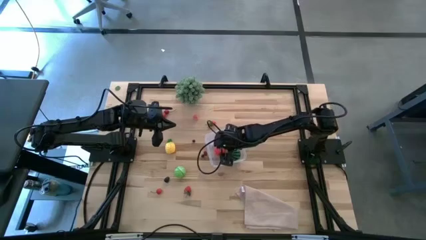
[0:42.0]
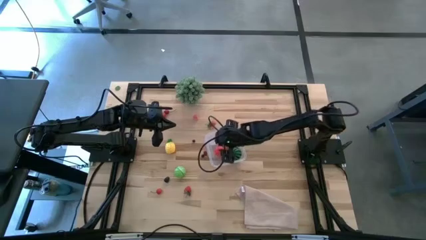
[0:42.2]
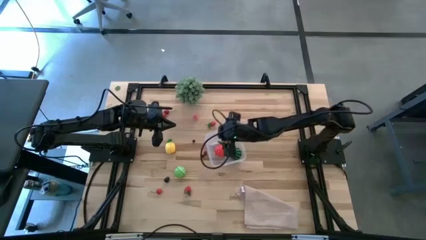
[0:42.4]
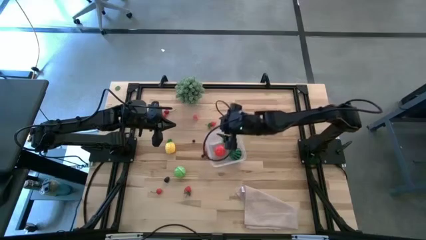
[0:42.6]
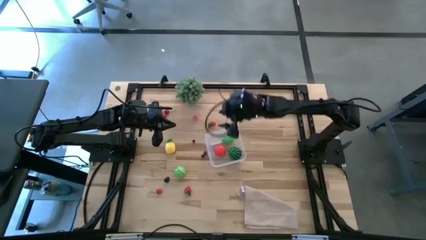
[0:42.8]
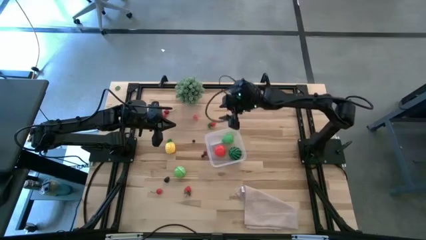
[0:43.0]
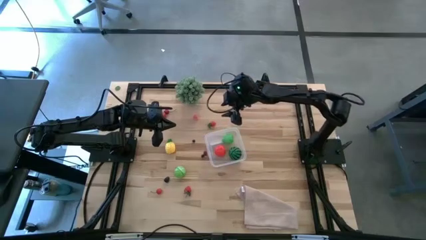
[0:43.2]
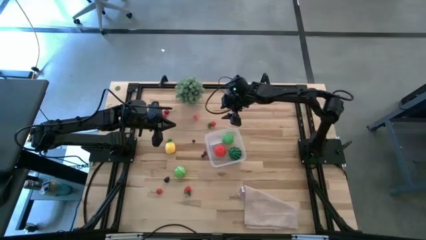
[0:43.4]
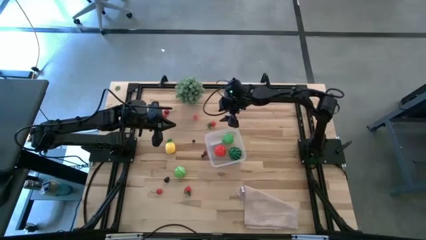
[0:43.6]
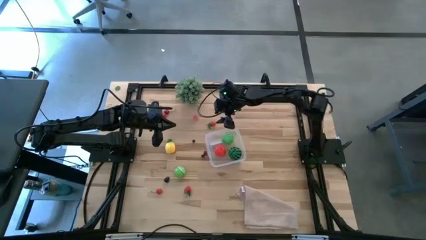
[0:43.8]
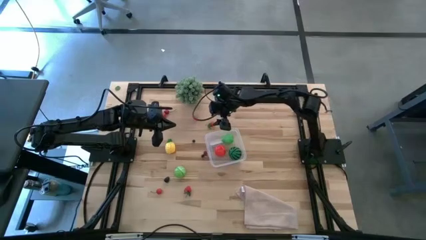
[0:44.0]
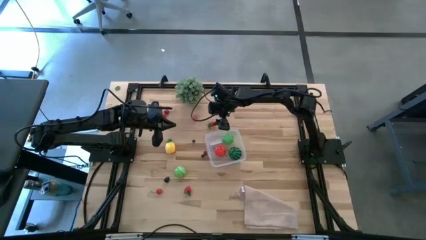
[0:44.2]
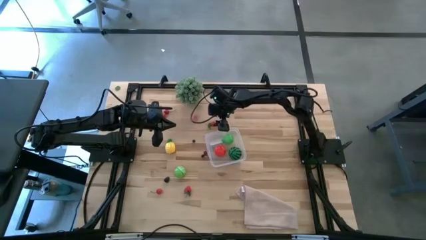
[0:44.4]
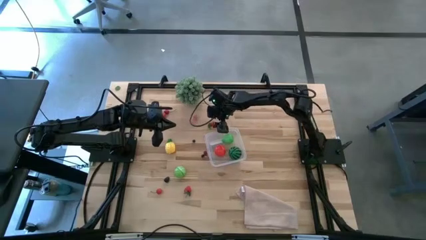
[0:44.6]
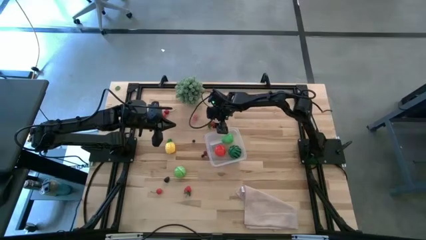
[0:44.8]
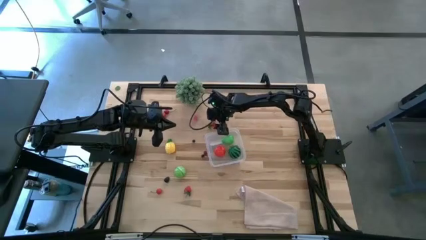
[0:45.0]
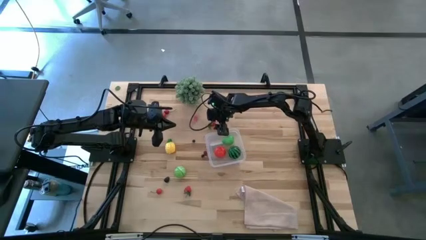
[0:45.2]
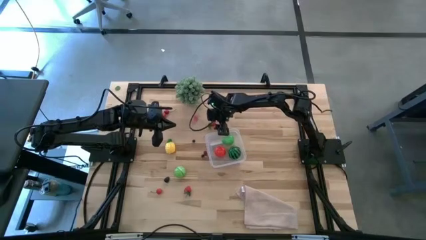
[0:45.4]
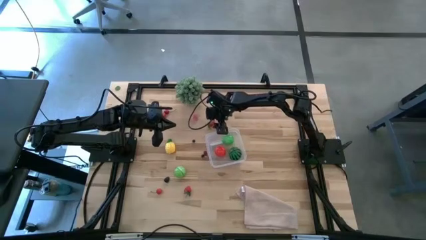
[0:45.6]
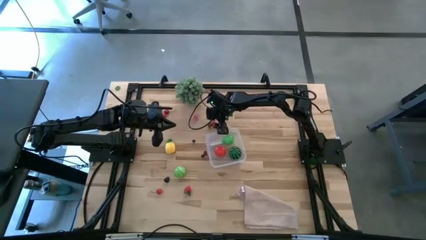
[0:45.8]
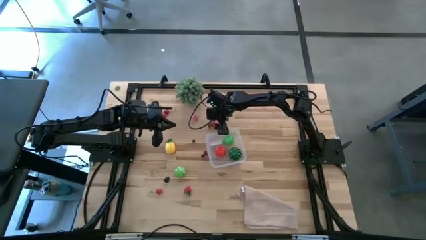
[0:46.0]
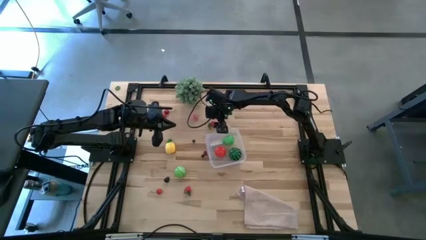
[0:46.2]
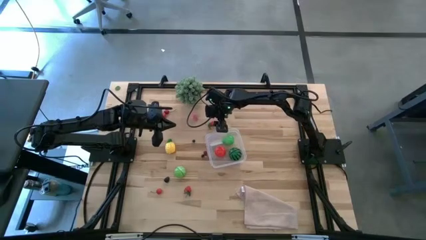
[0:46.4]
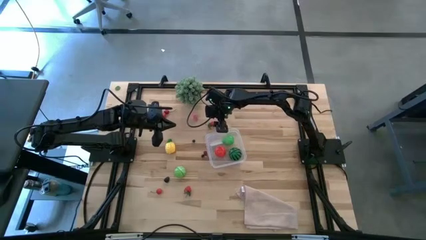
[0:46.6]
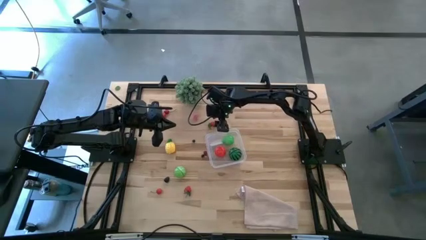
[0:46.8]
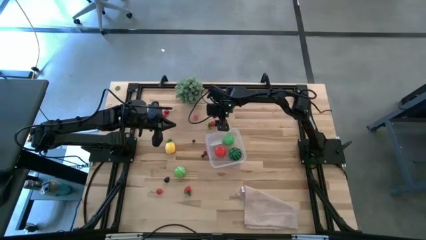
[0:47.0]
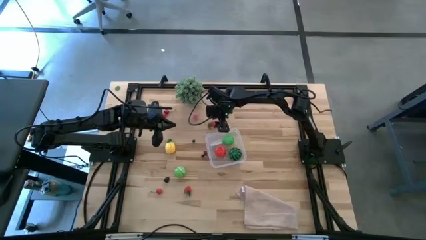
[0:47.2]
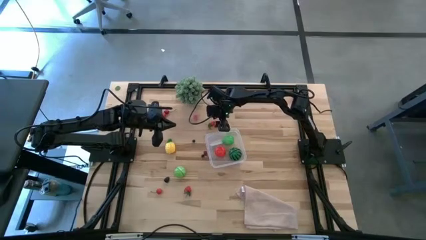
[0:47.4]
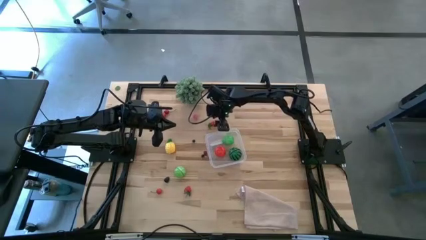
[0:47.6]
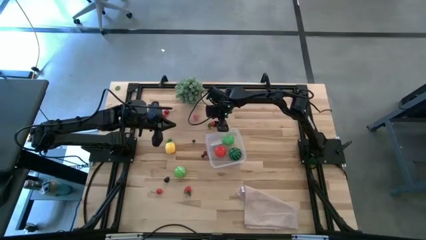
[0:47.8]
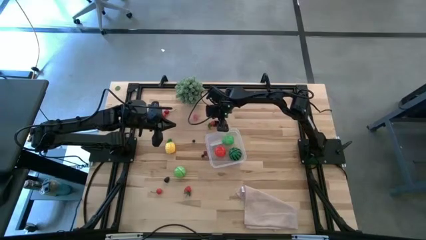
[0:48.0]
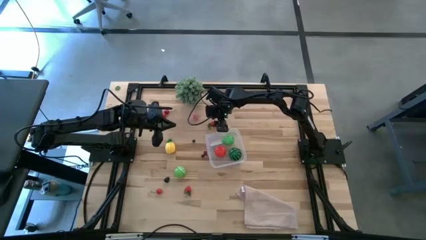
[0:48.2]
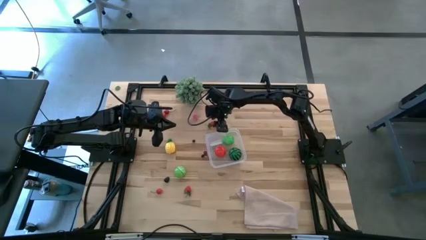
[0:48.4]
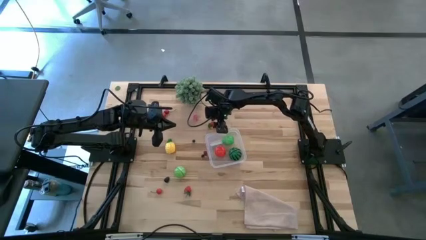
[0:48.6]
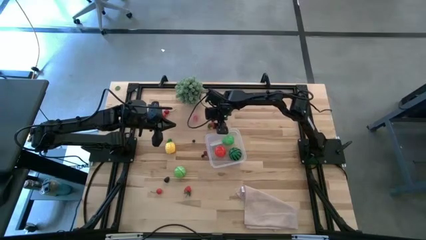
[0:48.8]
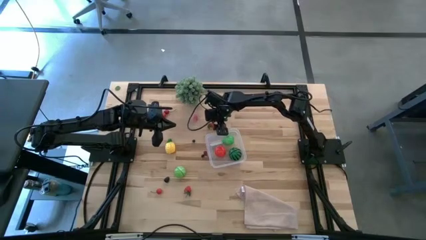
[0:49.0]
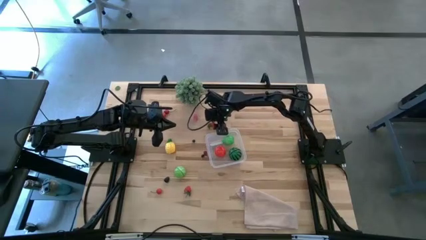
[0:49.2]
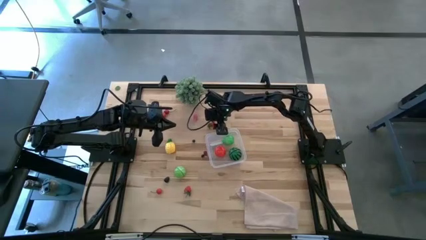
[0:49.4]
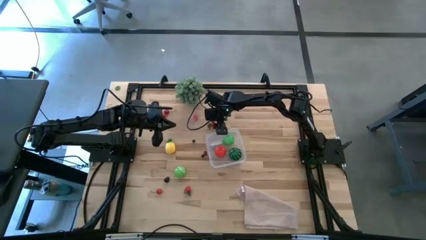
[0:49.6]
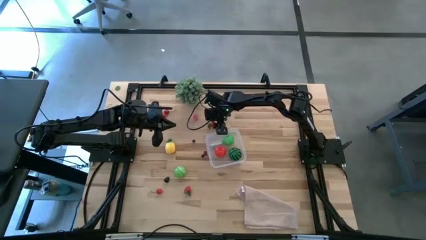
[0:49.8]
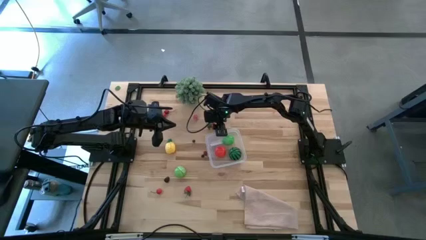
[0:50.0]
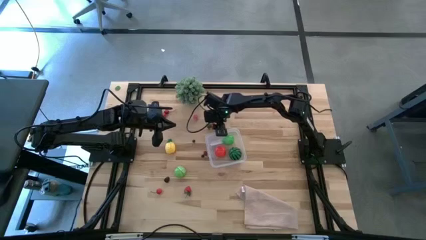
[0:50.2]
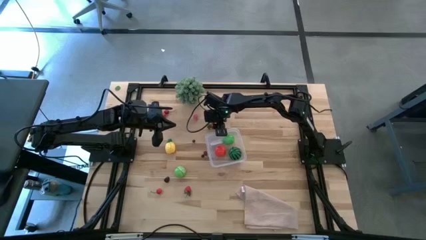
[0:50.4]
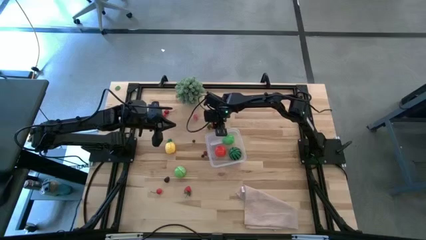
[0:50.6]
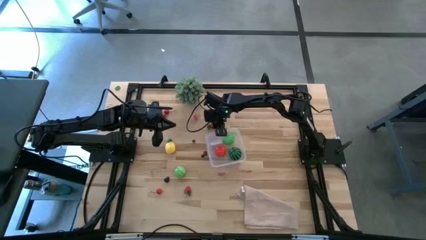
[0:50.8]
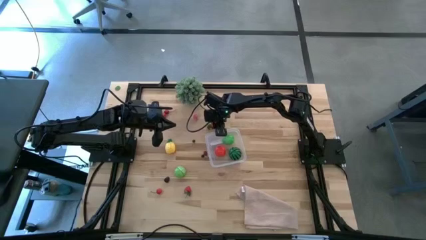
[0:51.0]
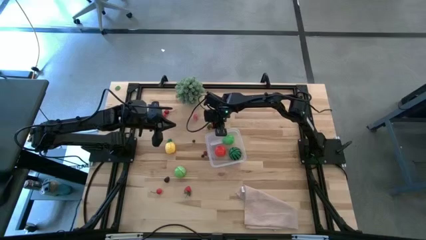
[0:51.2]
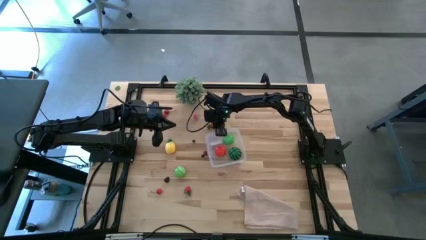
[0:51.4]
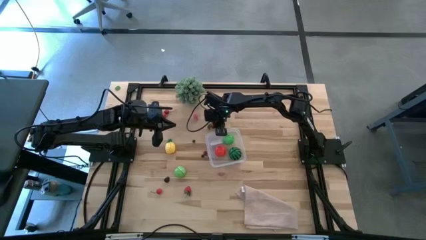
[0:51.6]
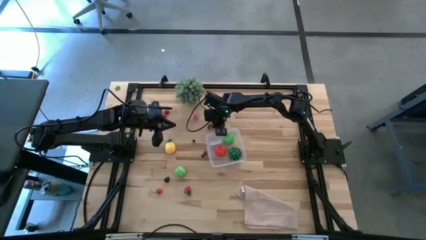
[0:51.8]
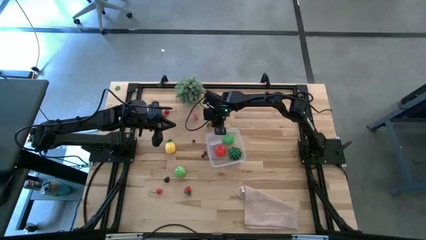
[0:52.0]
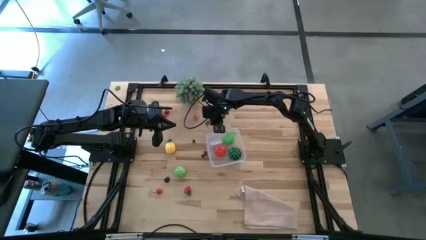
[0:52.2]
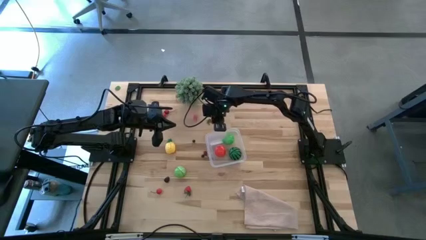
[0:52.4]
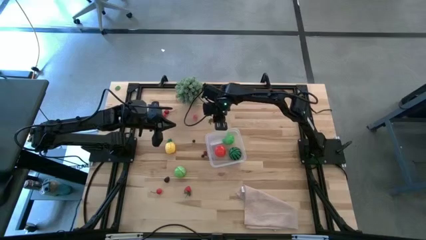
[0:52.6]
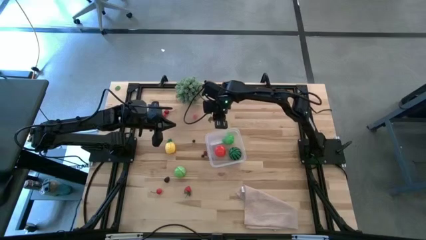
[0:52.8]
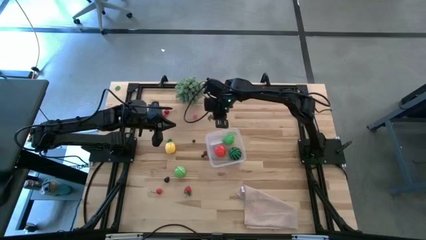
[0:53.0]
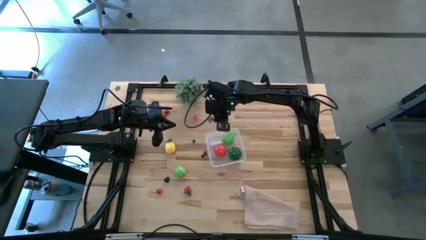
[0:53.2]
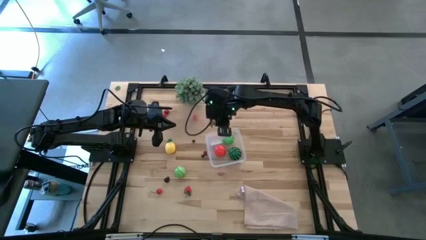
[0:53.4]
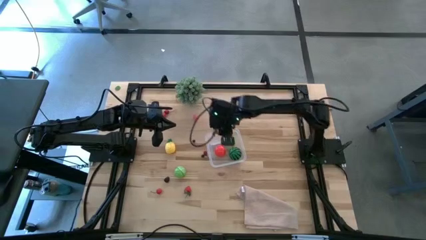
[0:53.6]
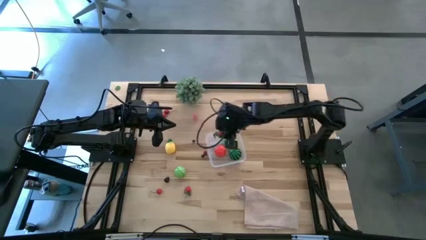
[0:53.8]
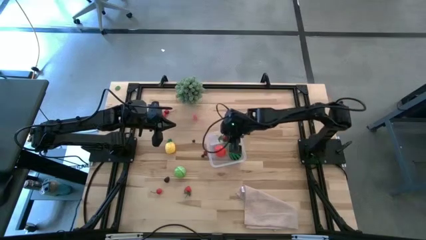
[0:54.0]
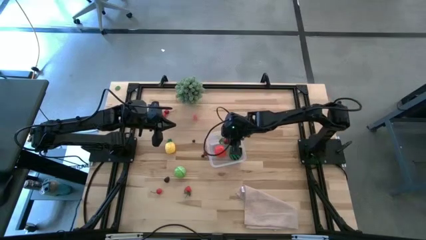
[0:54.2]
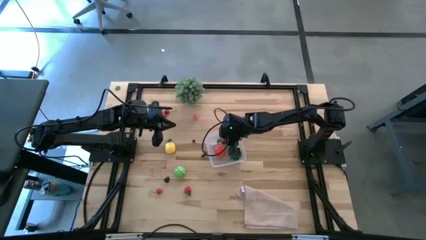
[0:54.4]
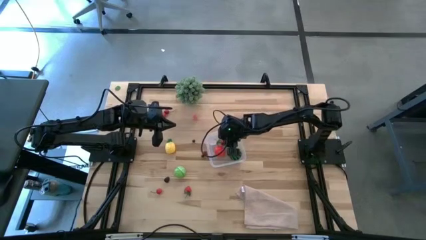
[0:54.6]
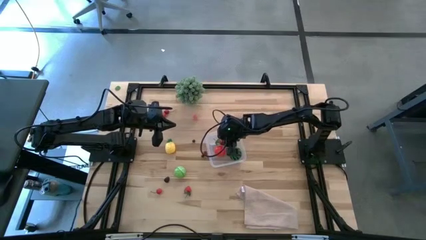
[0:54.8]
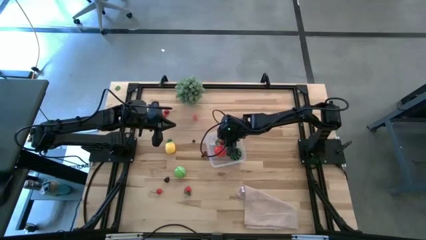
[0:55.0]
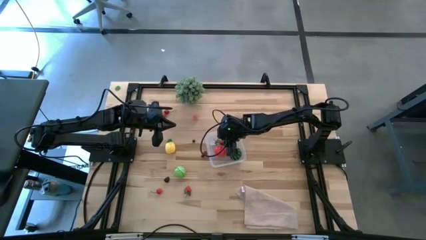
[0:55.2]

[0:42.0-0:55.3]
Task: Pick and placing Produce into tupperware
Put the red cherry into the transparent bin

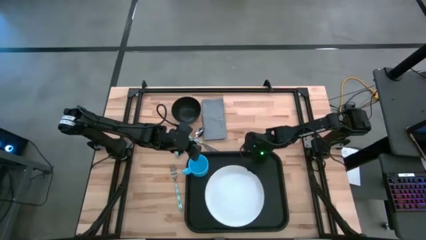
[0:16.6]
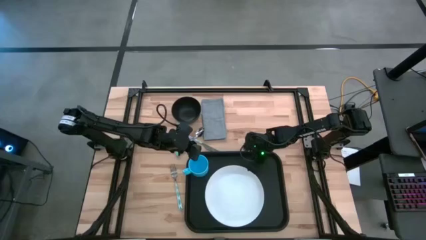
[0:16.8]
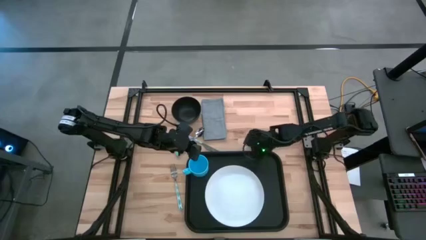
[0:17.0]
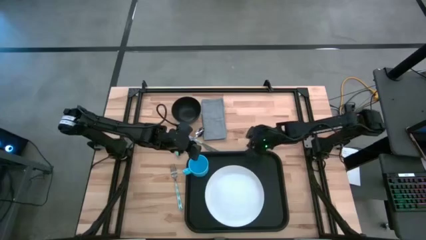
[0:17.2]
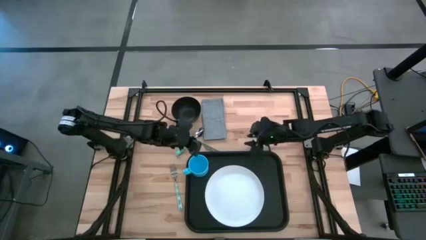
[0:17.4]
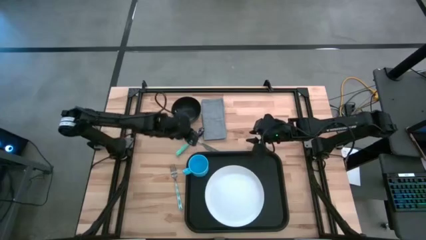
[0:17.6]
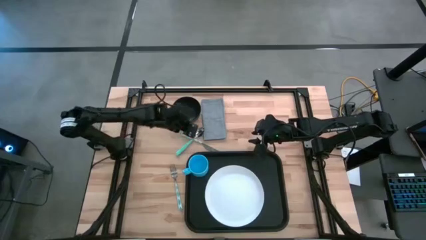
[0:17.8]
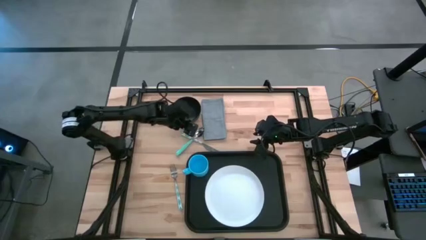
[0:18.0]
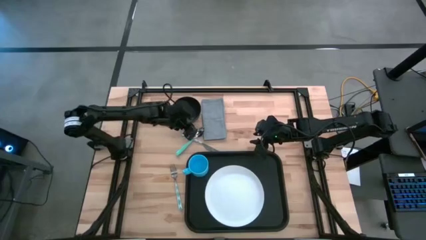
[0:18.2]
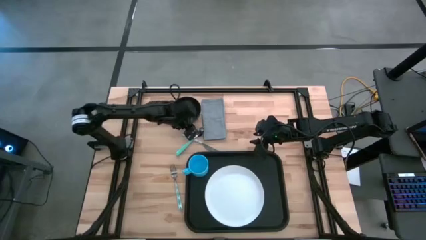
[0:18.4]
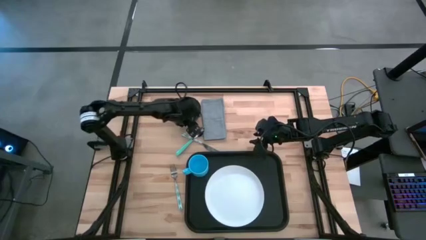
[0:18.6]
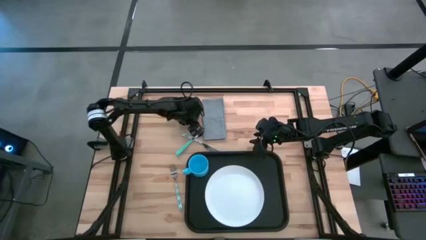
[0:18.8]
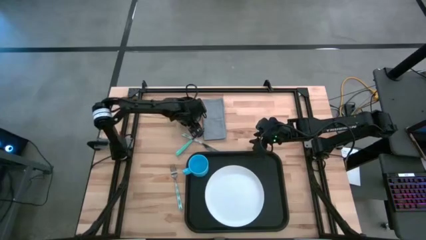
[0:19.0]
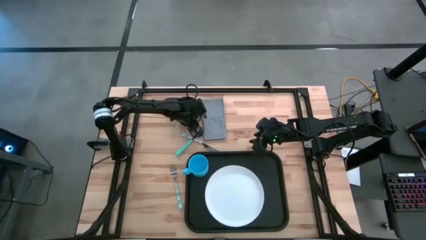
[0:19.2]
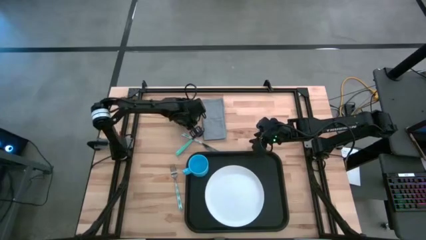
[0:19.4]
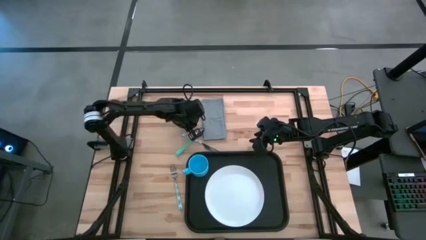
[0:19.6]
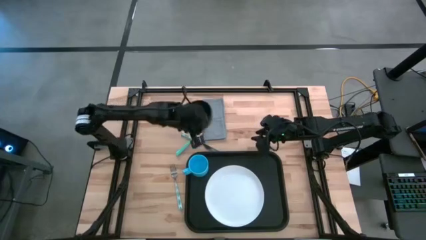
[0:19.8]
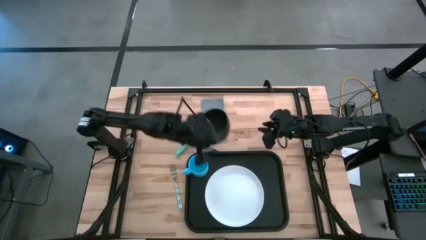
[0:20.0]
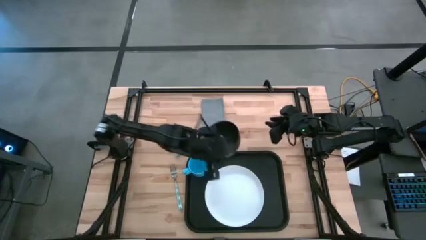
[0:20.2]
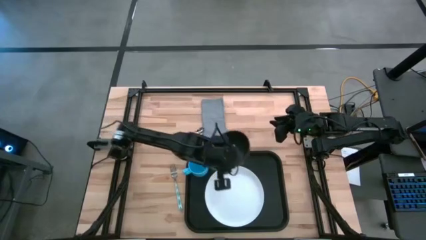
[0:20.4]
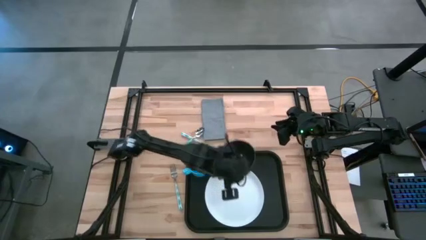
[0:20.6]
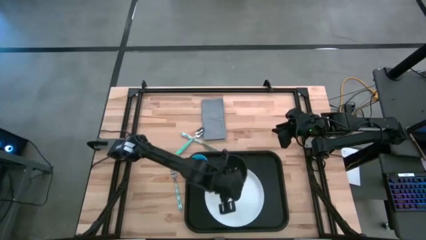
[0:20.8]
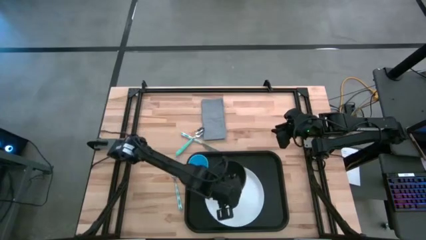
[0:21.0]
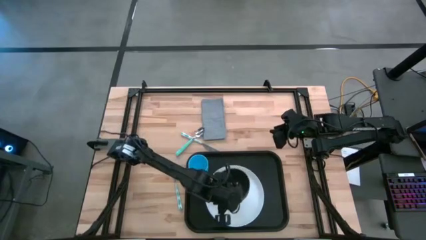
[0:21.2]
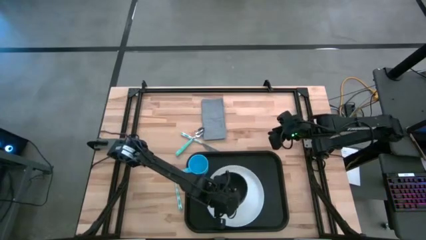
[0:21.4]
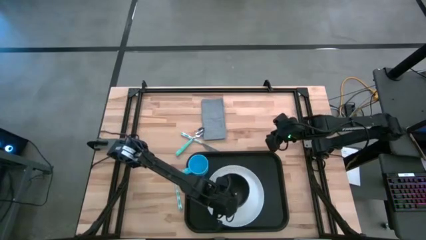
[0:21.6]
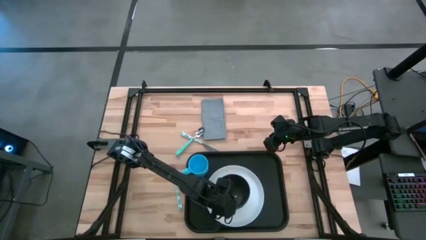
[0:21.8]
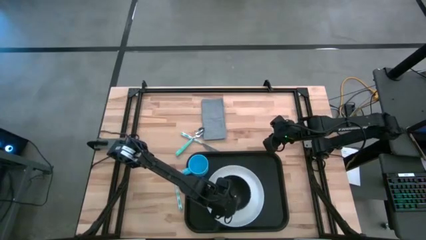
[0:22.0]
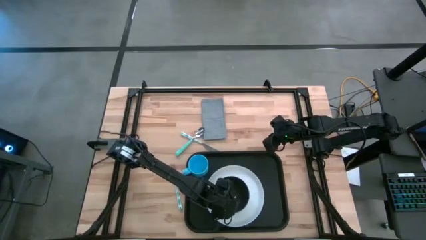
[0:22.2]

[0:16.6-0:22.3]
Task: Set up tray
Put the black bowl on the white plate
